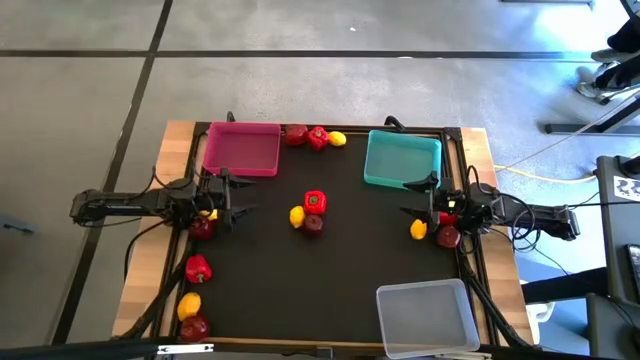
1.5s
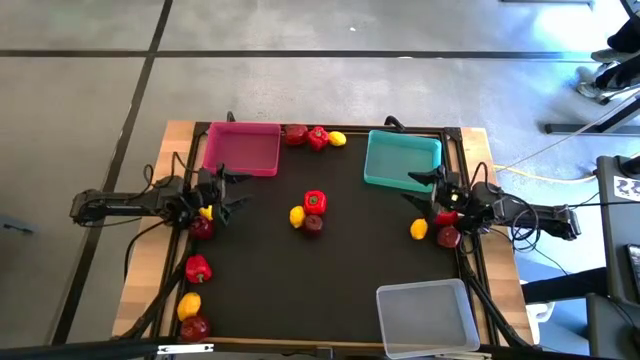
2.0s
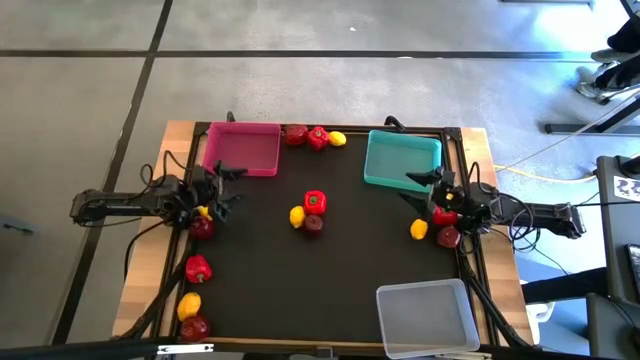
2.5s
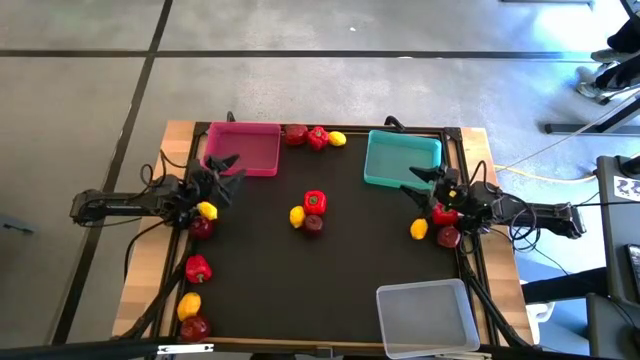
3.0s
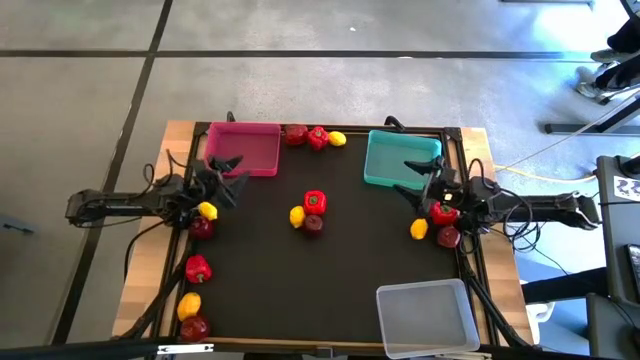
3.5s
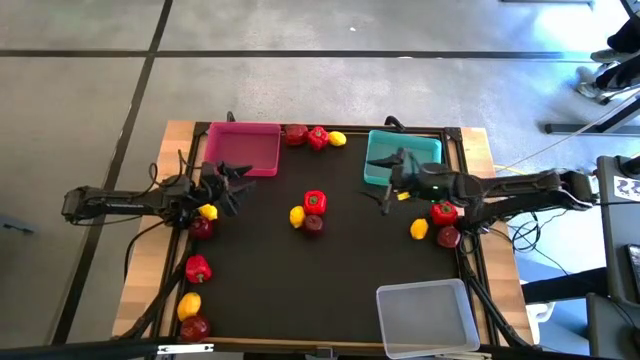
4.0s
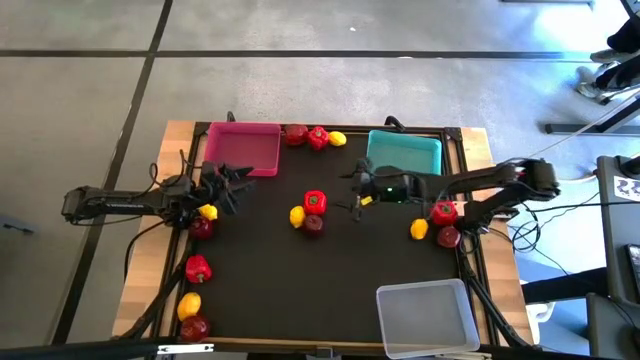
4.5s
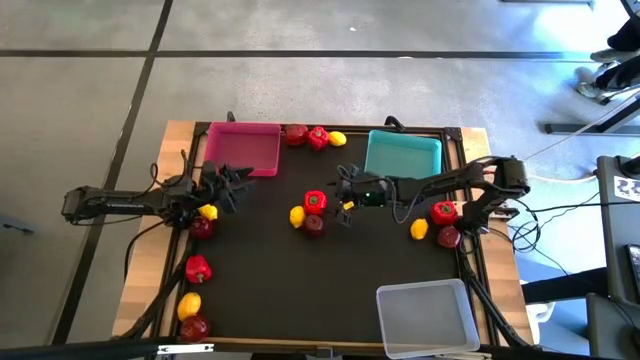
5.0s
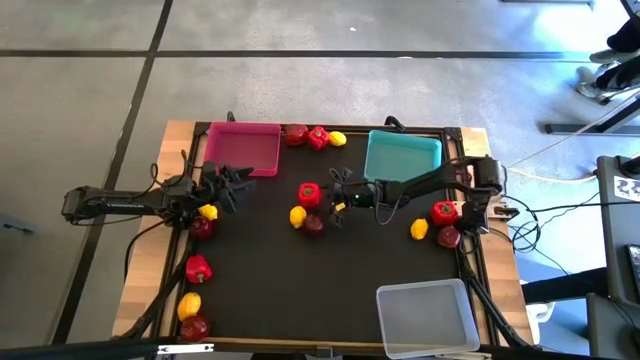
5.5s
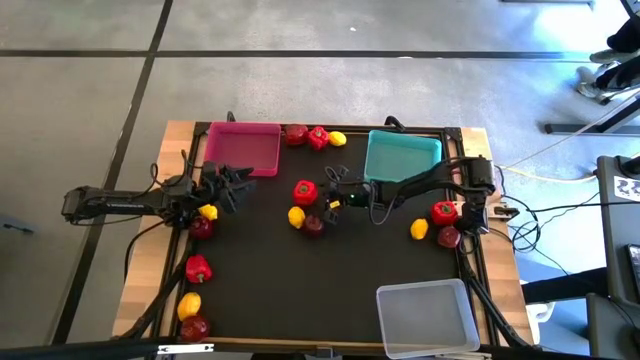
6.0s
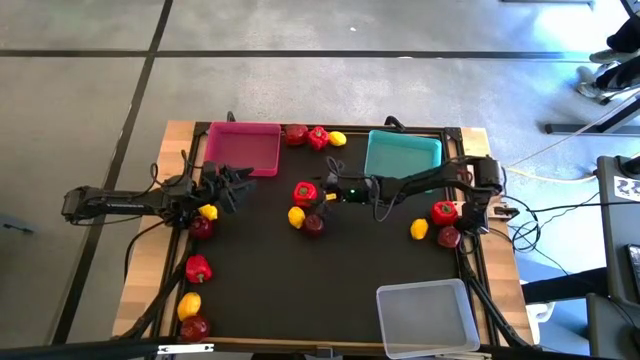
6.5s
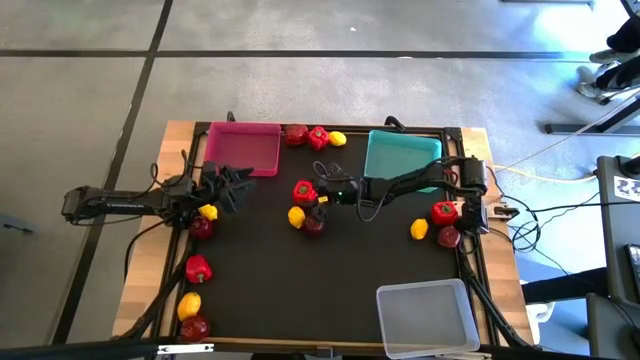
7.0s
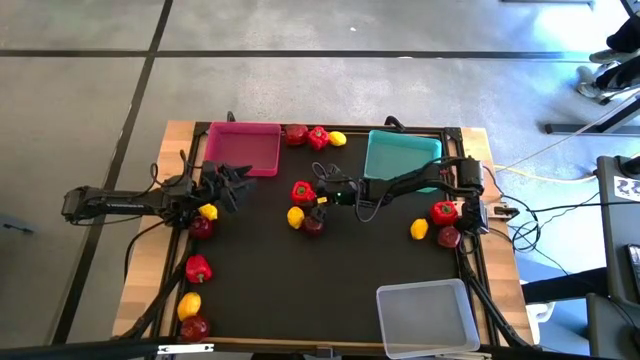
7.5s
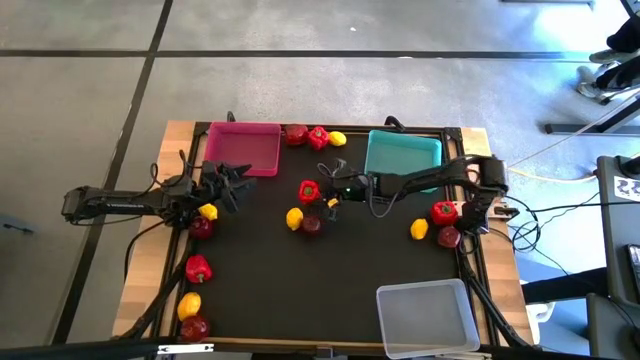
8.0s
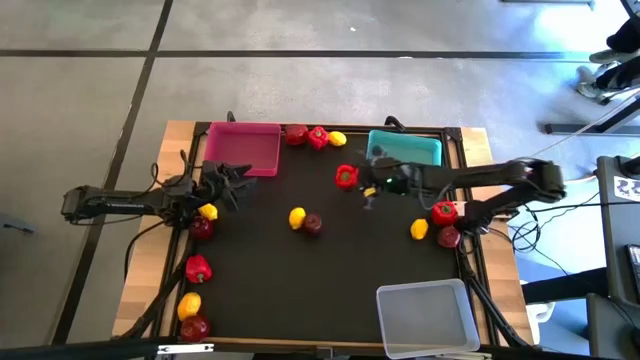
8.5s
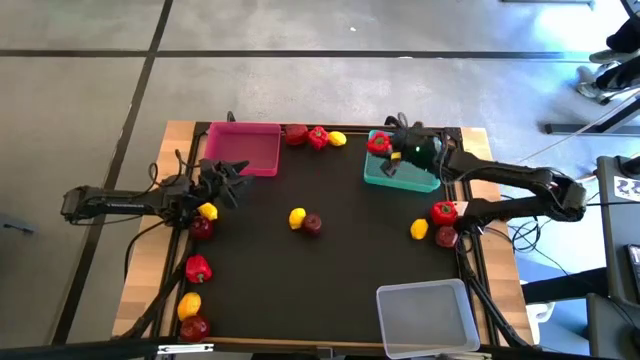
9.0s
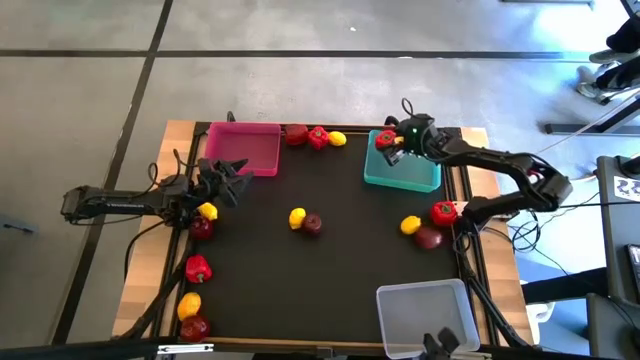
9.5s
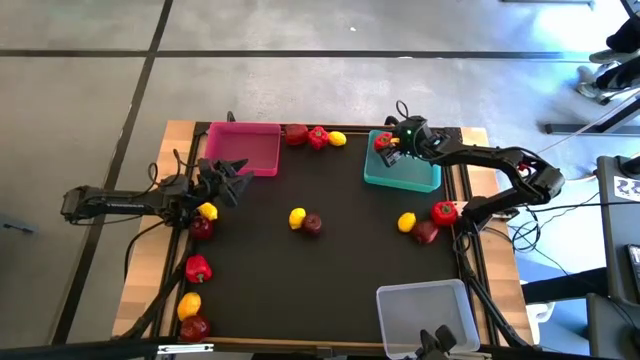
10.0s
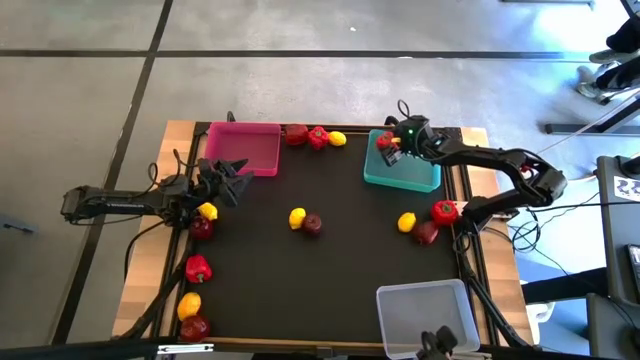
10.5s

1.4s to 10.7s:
Task: Sort produce into baskets
Put the bell pepper into the blue bin

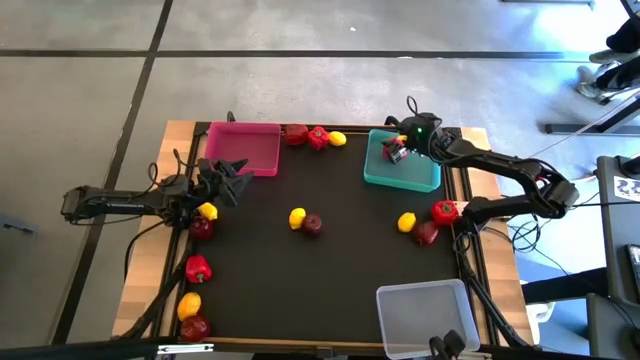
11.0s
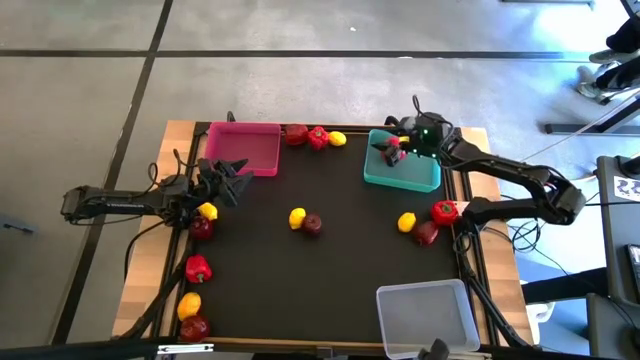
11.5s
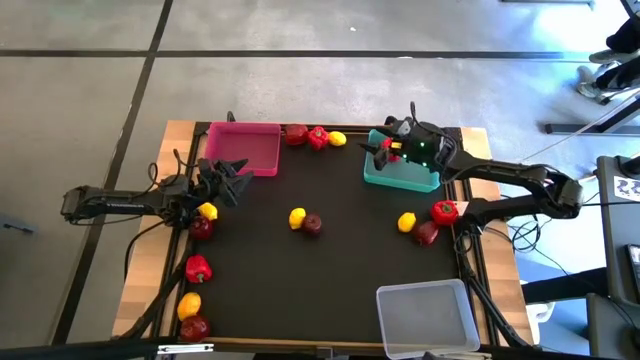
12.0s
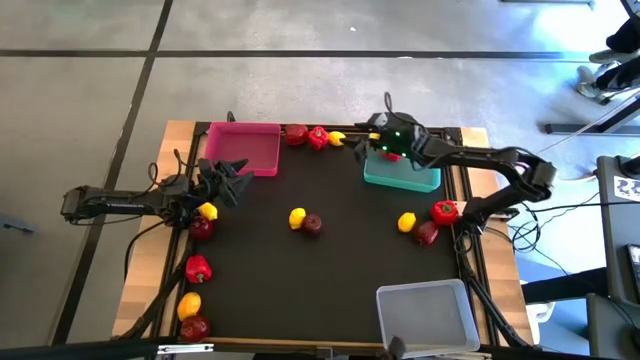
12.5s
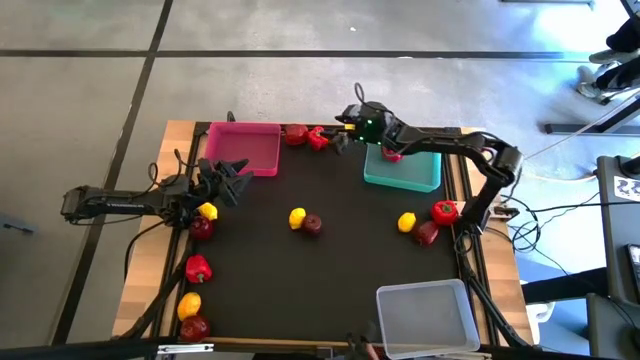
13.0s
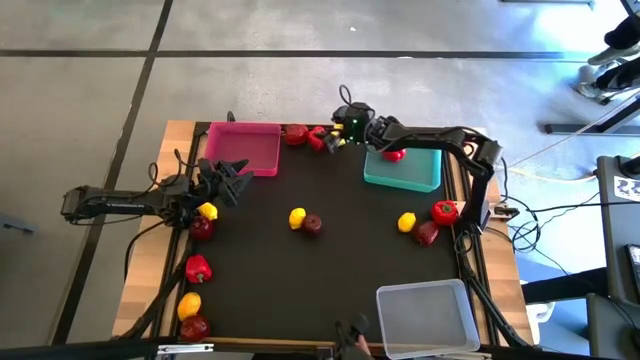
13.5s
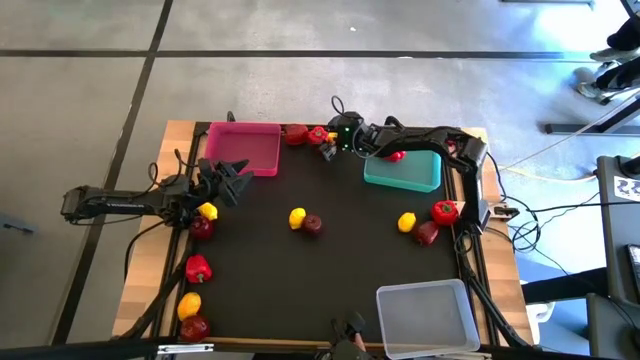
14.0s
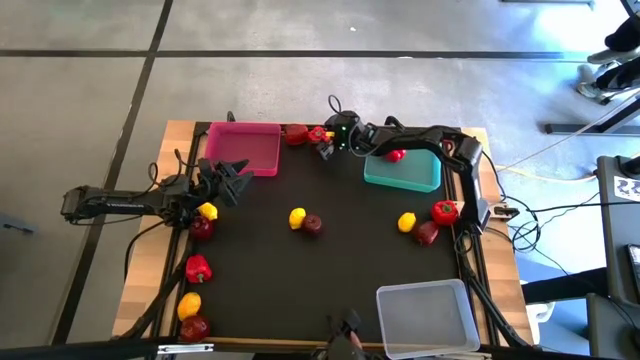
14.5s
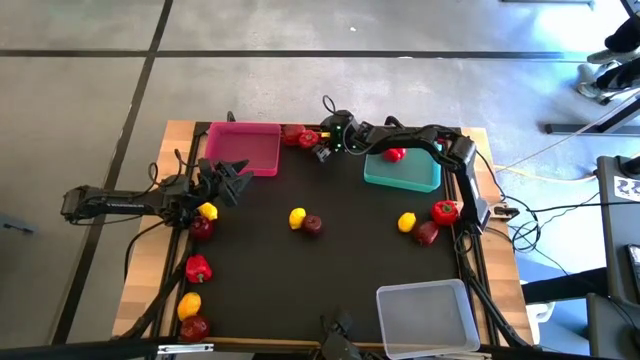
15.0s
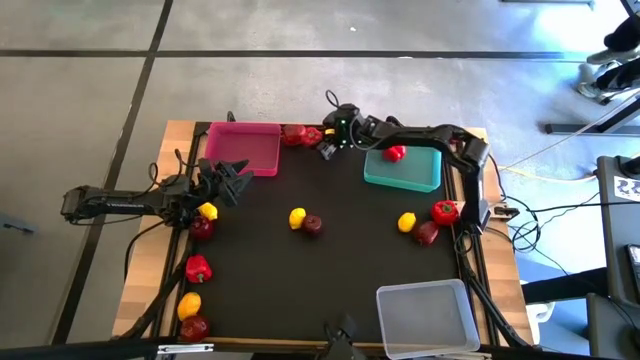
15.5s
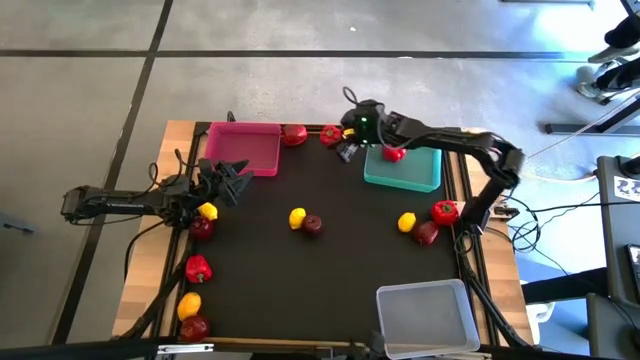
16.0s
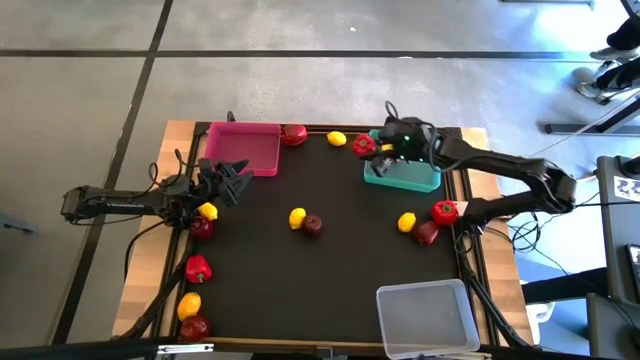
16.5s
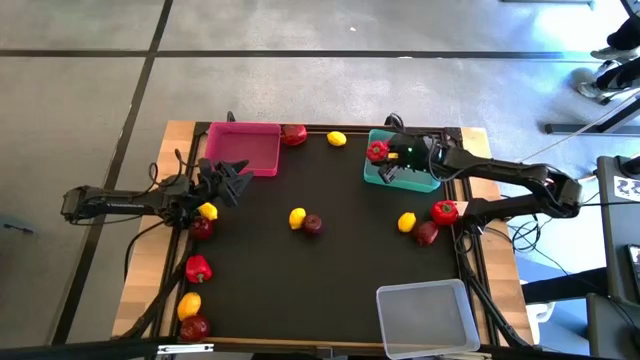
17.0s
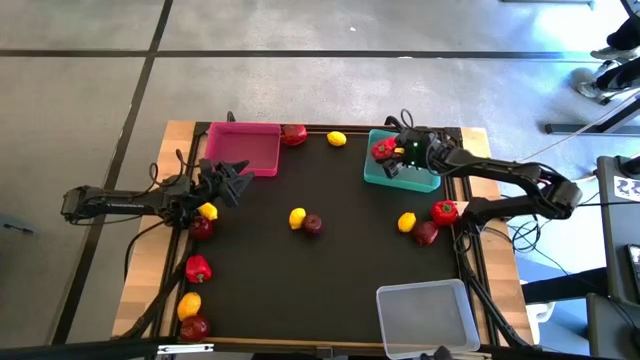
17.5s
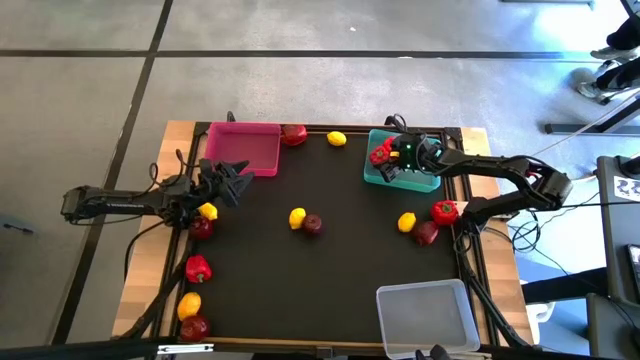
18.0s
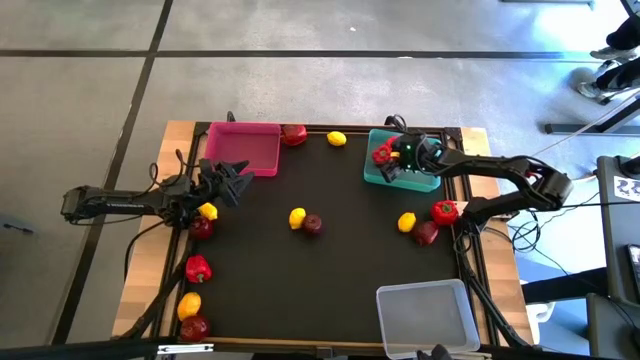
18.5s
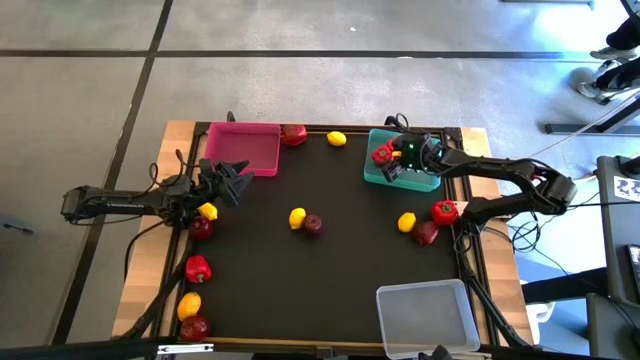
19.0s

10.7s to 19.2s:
Put the bell pepper into the blue bin

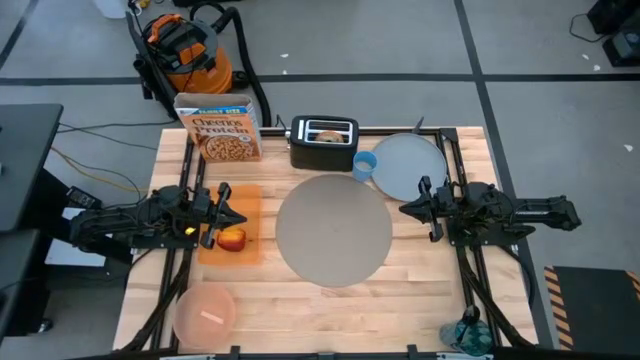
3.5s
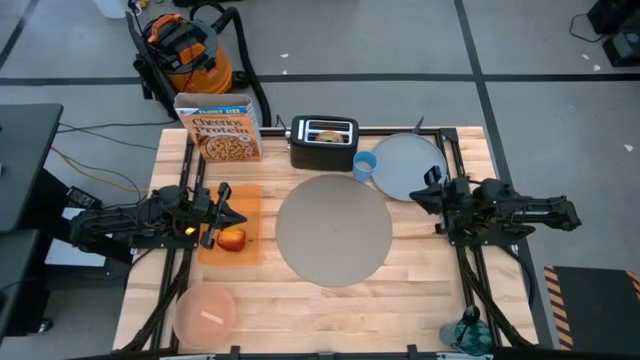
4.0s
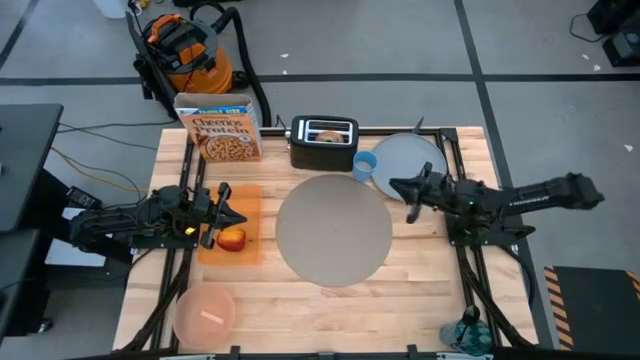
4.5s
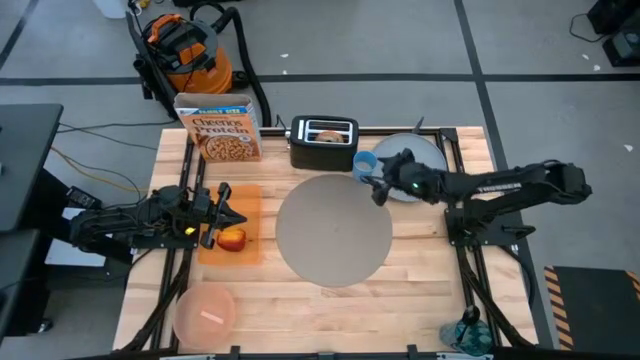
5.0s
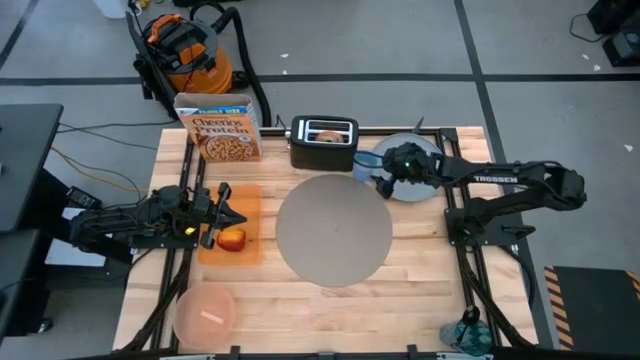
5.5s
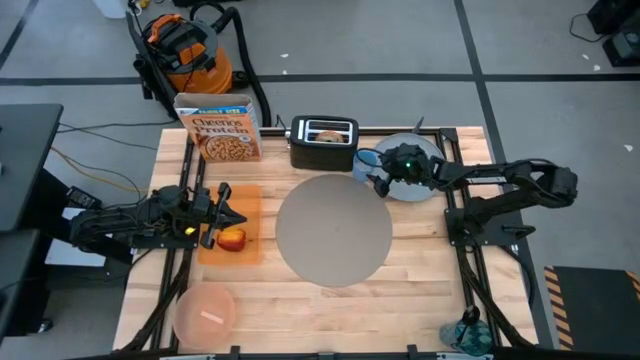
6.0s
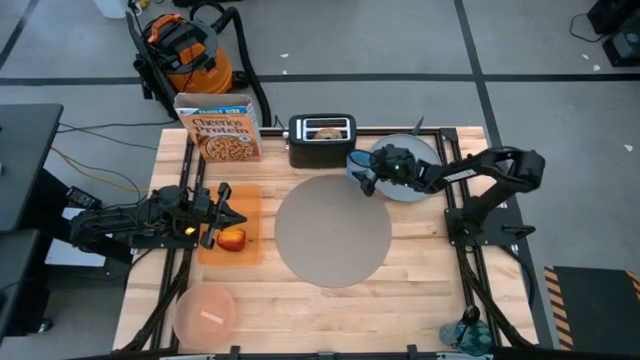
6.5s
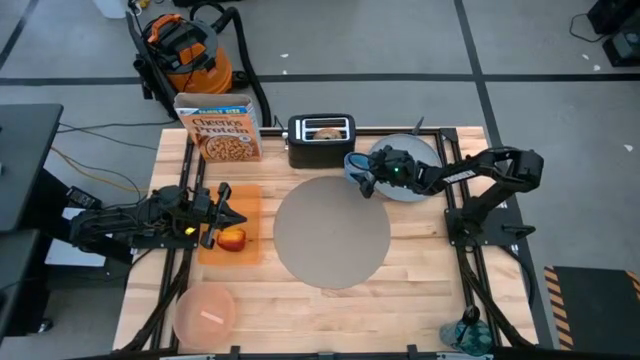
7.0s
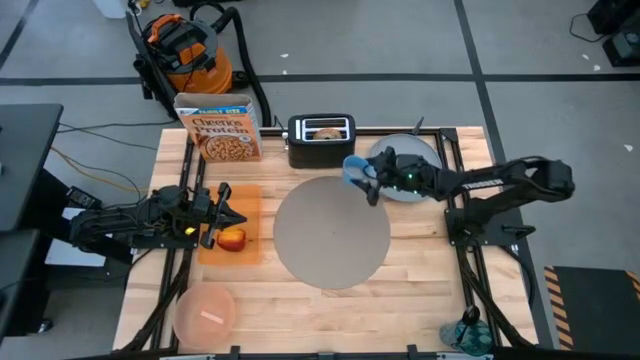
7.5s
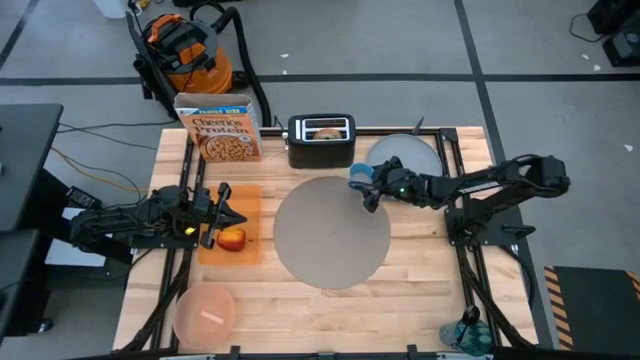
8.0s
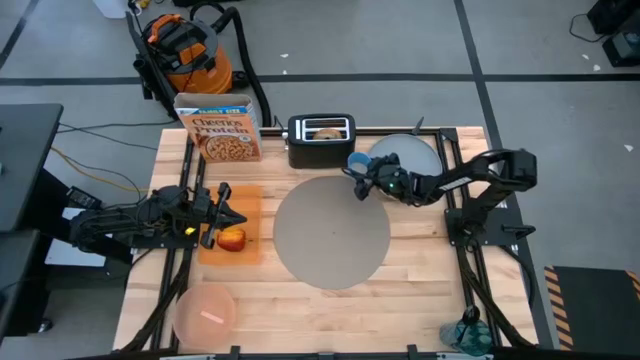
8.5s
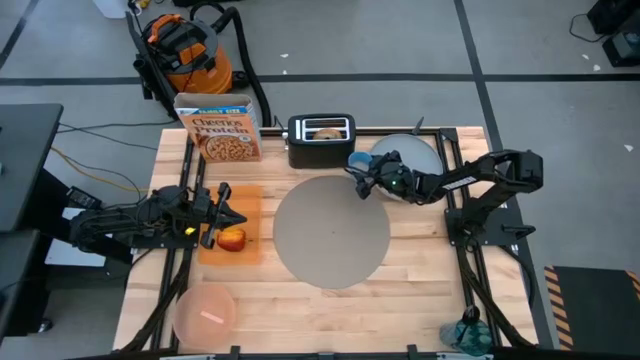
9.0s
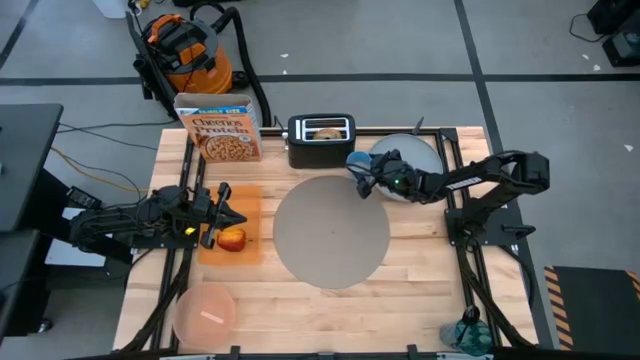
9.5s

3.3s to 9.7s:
Task: Arrange a breakfast setting
Adjust the blue cup on the table
